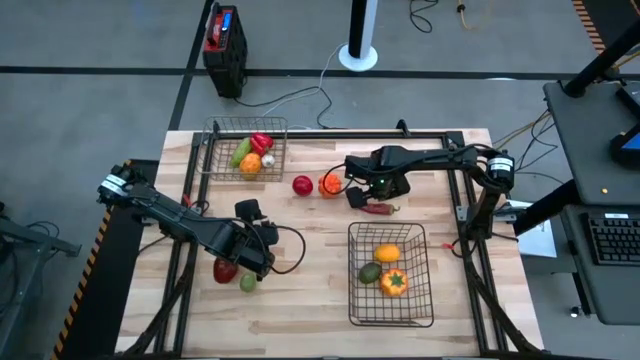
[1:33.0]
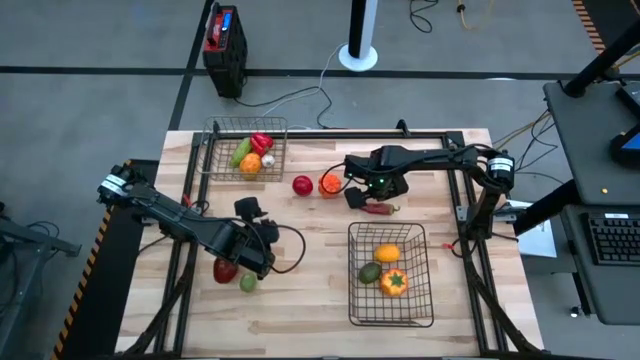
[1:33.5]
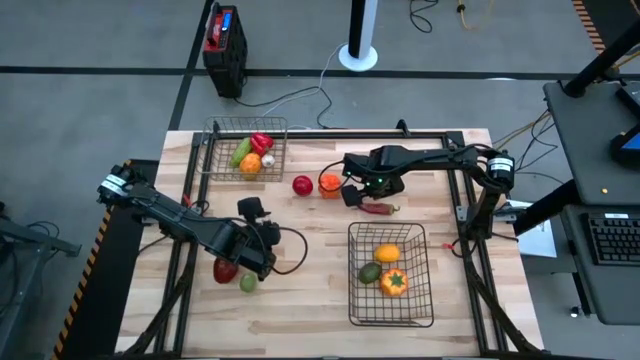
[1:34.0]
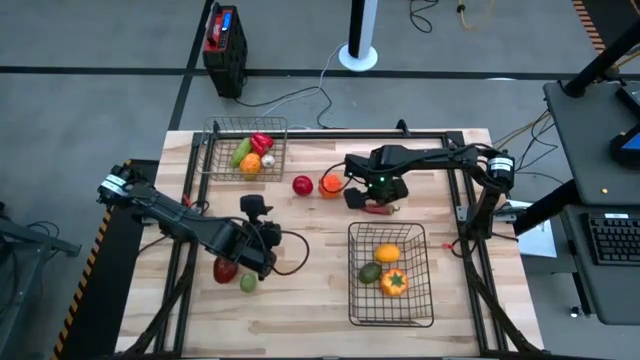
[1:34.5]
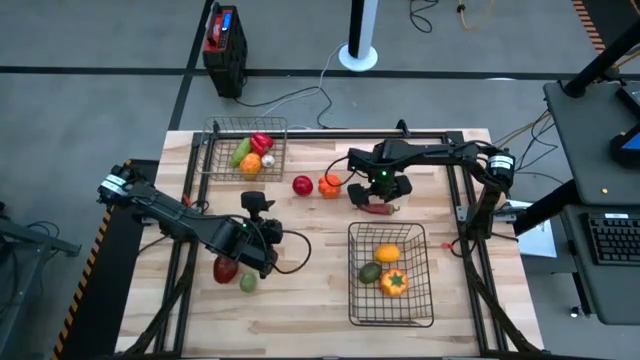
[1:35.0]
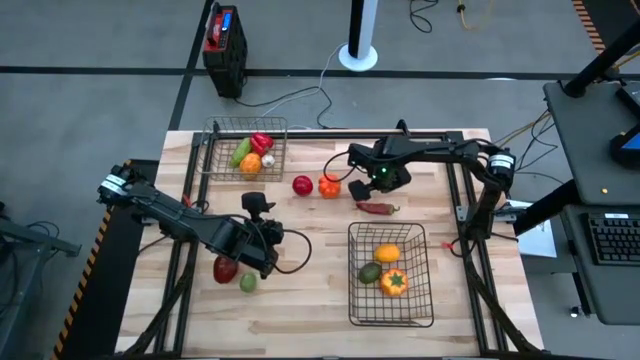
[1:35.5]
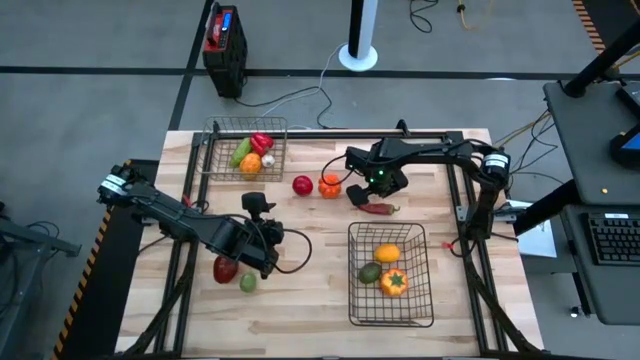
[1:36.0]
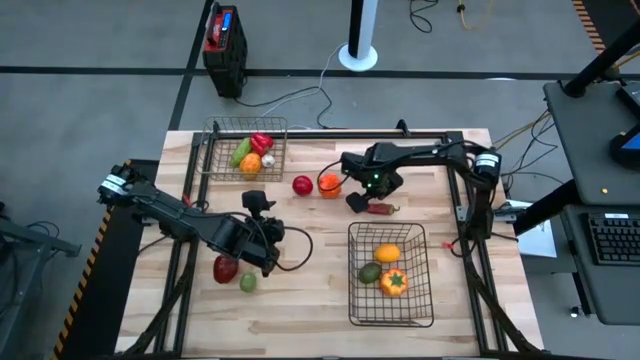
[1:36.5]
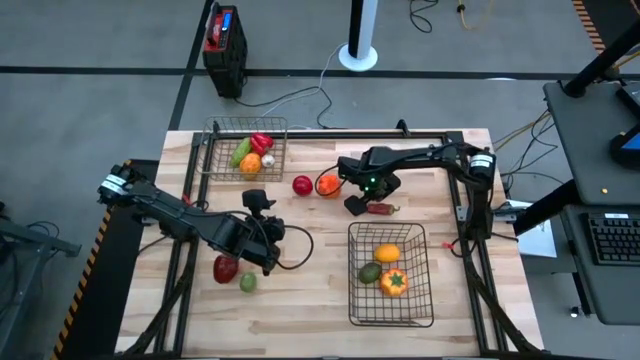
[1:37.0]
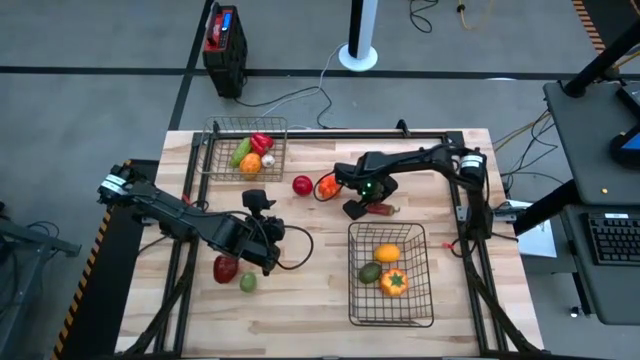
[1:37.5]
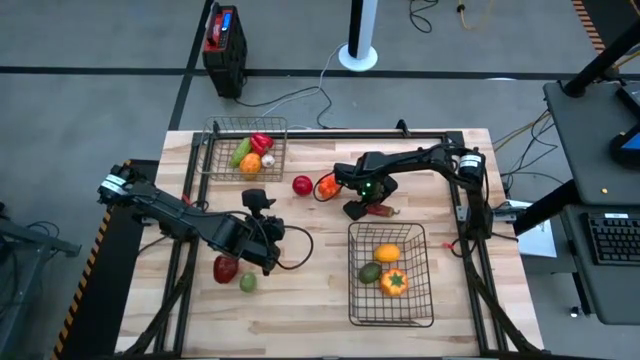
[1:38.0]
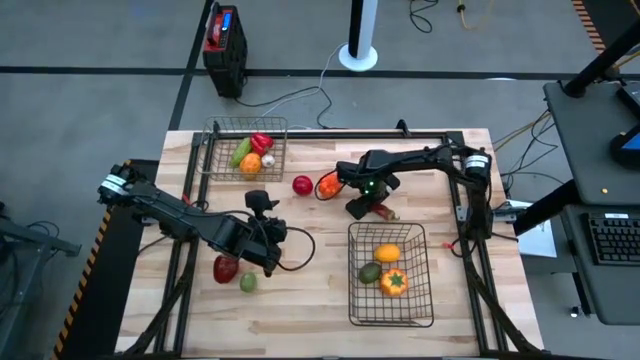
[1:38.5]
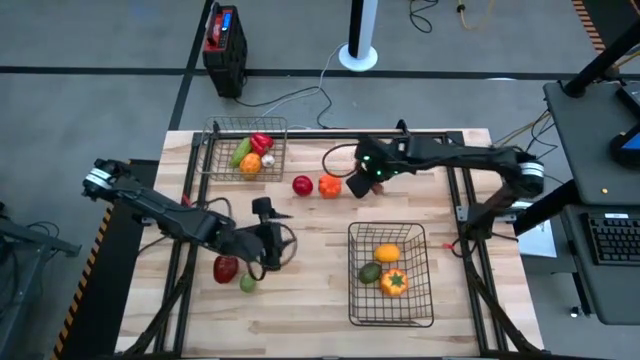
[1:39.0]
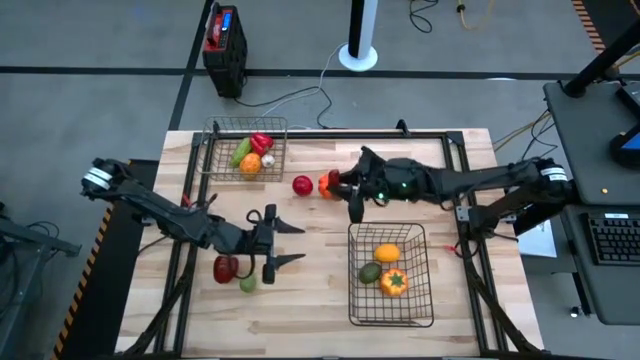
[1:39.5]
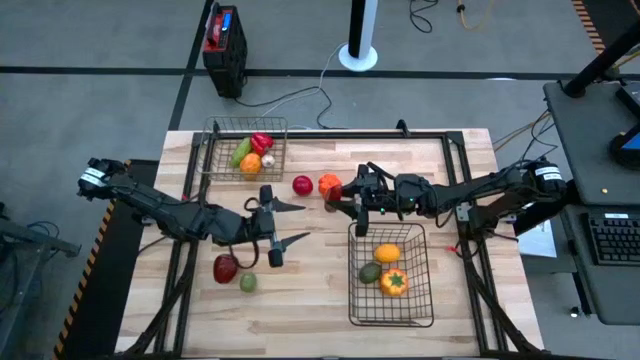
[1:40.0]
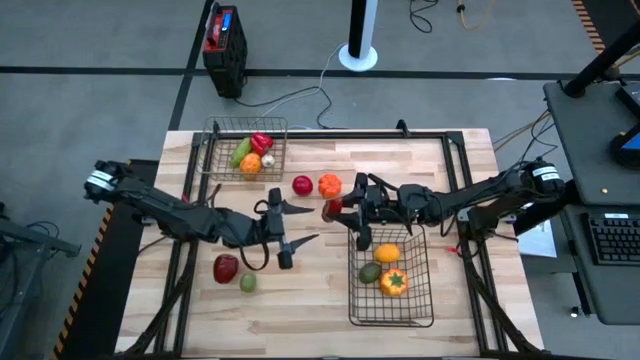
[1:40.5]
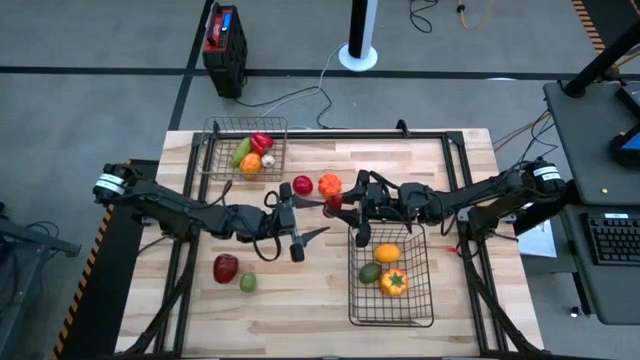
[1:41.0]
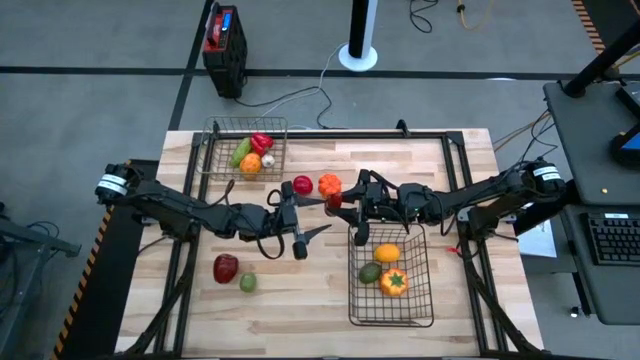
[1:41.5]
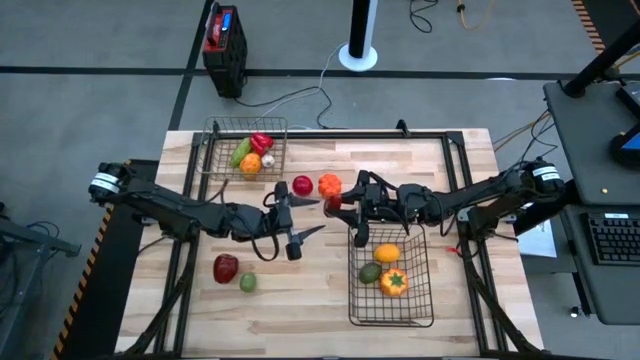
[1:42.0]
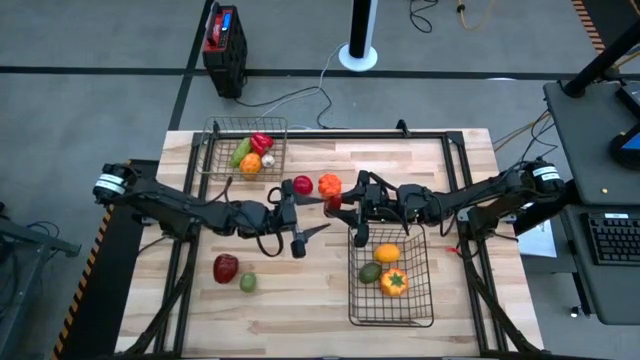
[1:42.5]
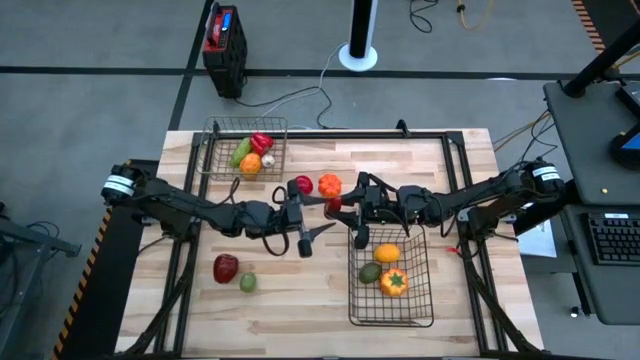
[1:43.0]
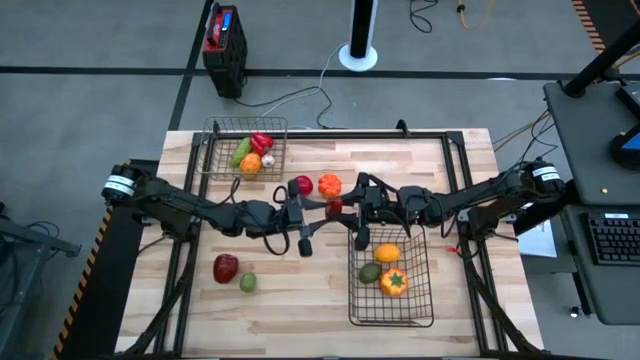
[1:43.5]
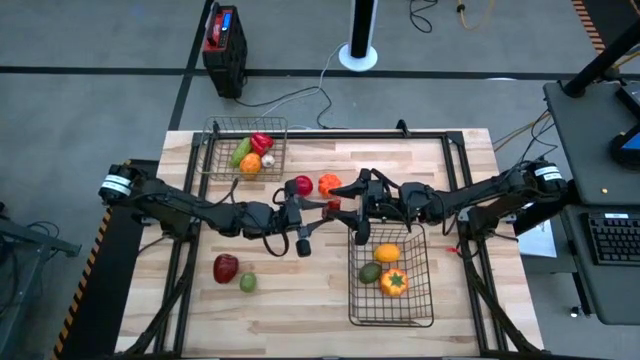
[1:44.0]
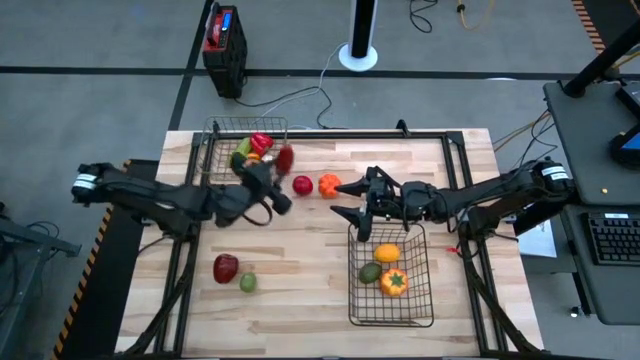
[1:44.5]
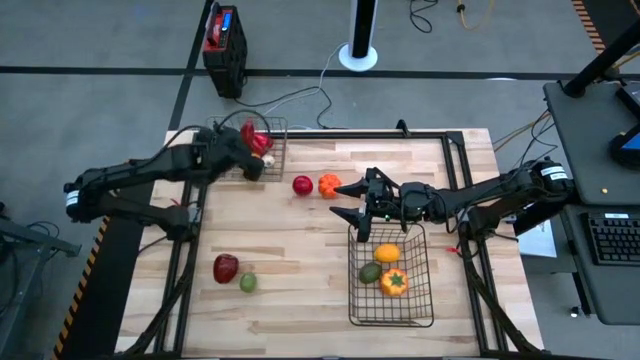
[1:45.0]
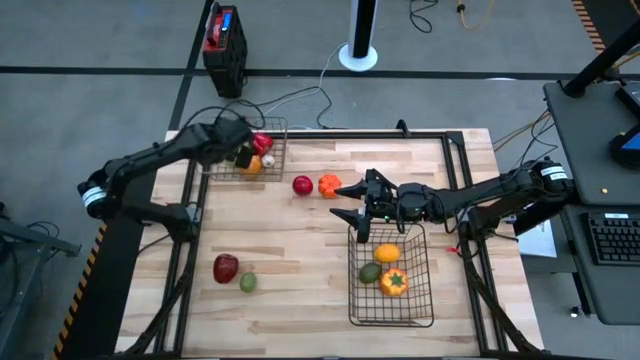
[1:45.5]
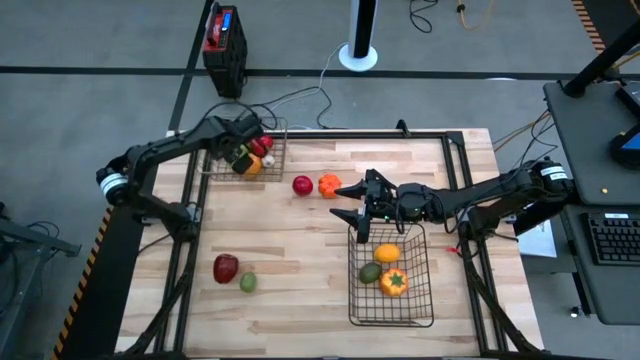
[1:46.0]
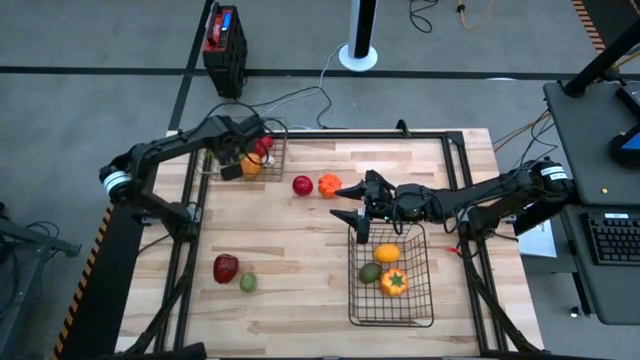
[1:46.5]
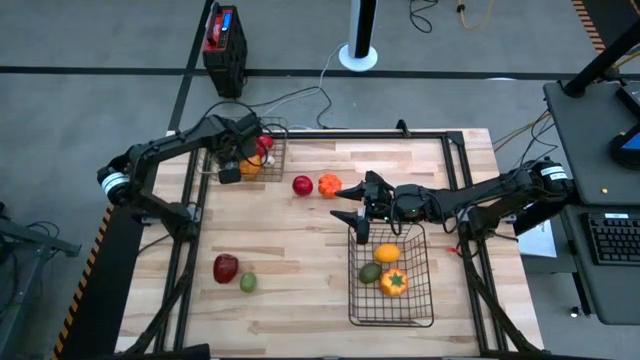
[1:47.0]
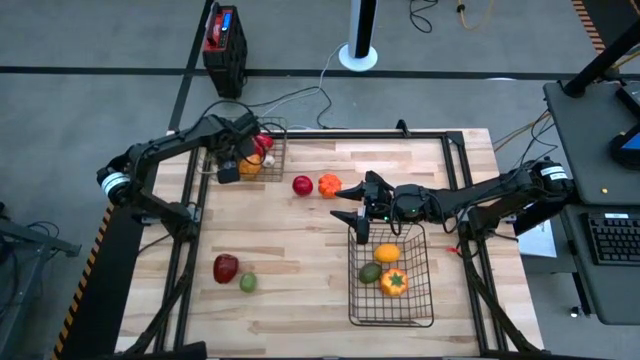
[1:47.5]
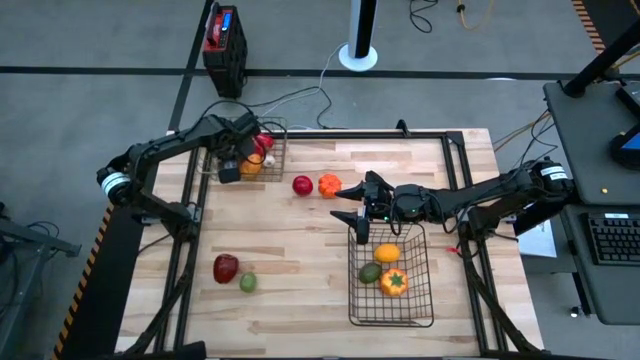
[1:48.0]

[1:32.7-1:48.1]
Task: Sort produce into baskets
Put the red chili pepper into the gold wire basket

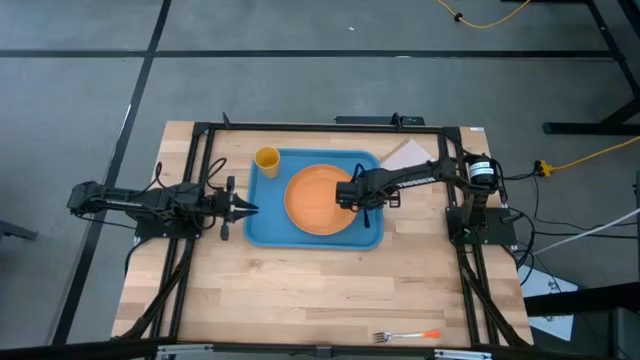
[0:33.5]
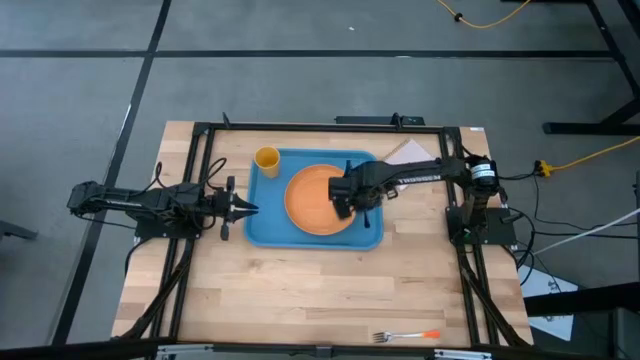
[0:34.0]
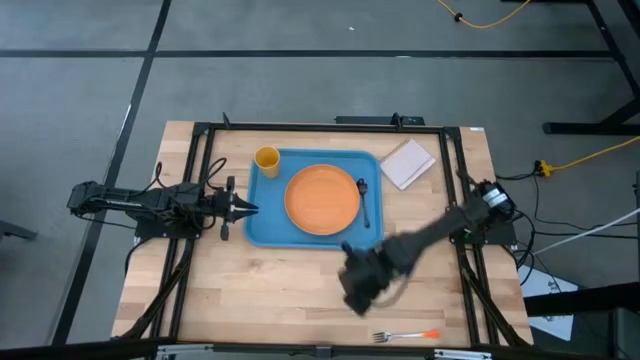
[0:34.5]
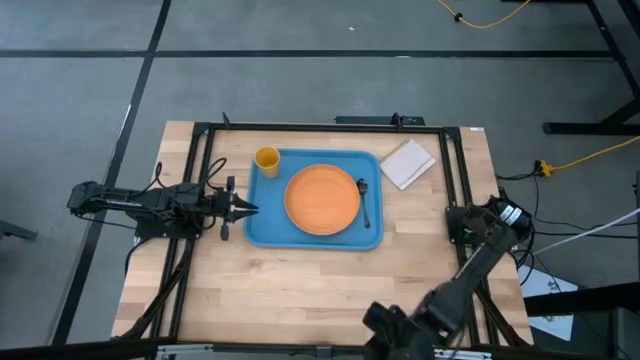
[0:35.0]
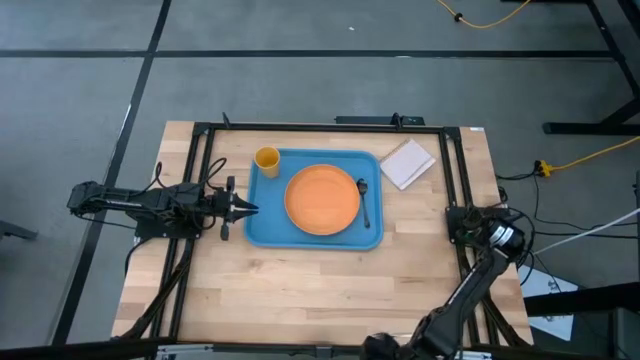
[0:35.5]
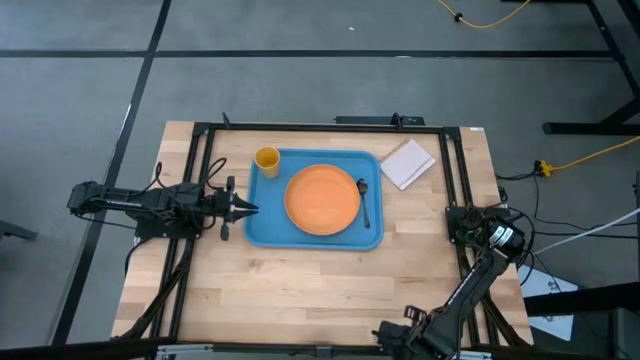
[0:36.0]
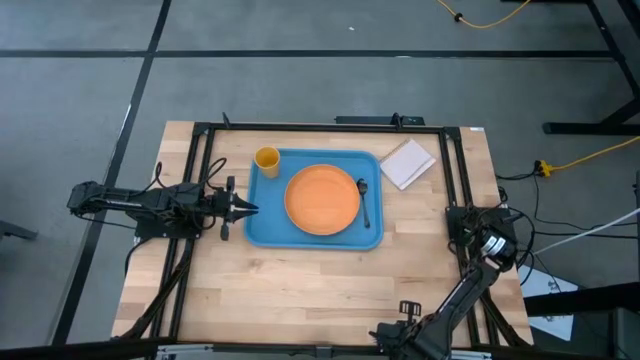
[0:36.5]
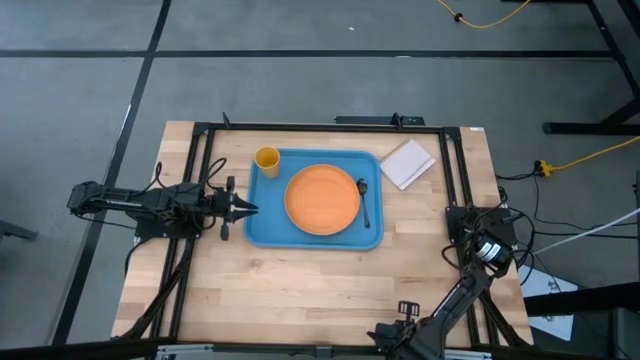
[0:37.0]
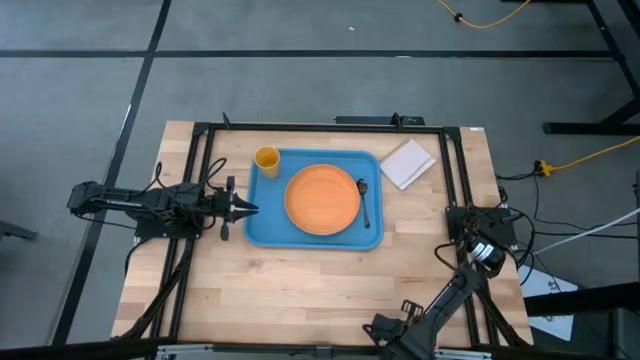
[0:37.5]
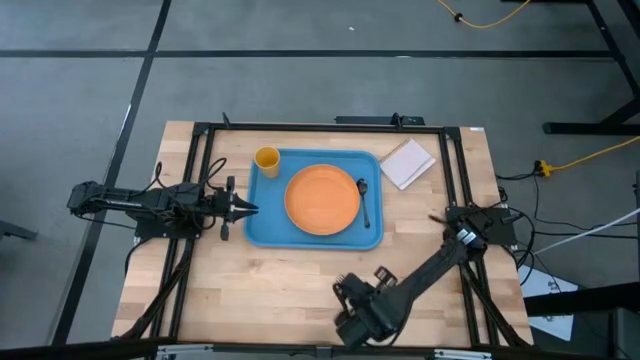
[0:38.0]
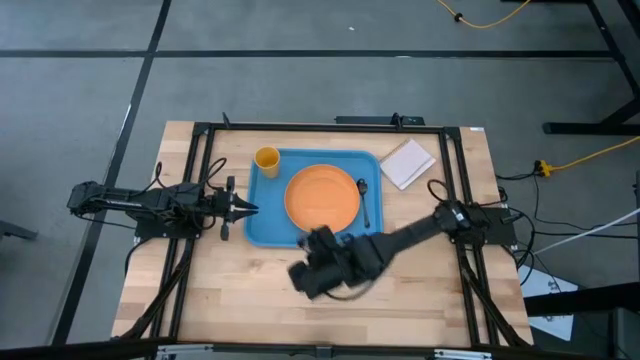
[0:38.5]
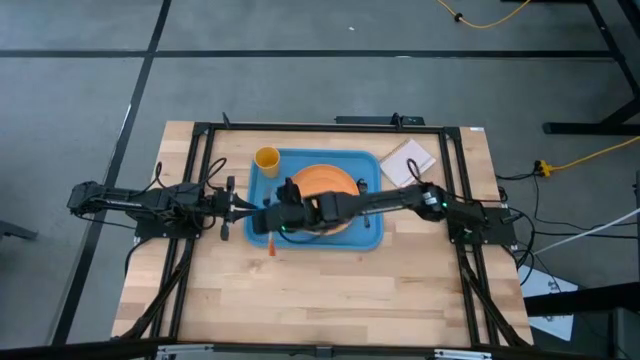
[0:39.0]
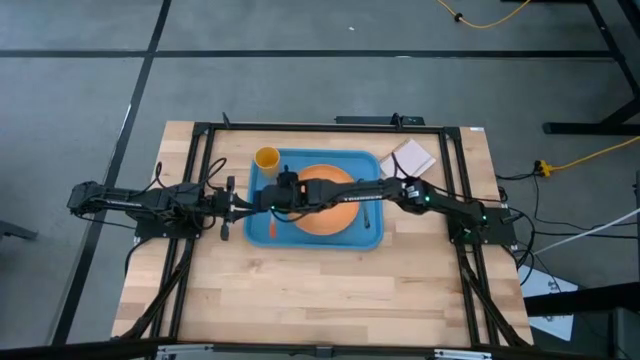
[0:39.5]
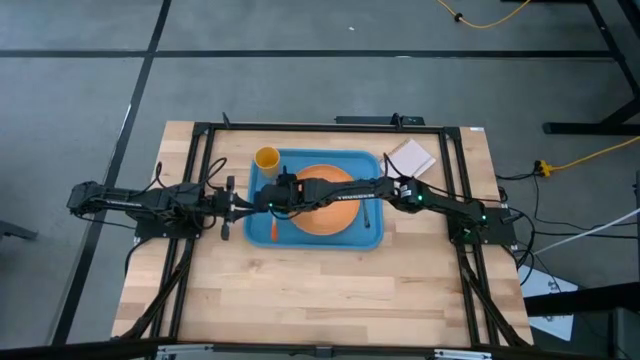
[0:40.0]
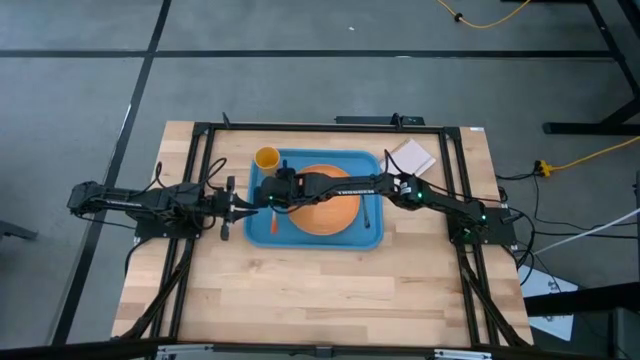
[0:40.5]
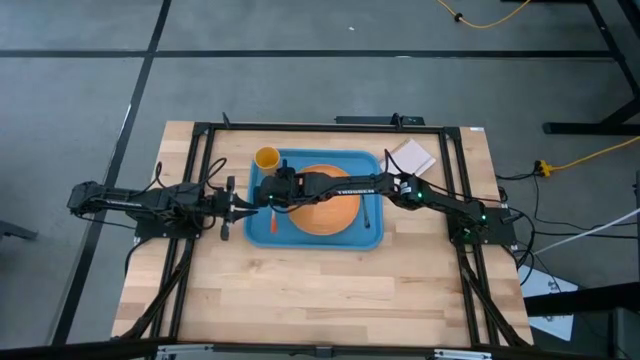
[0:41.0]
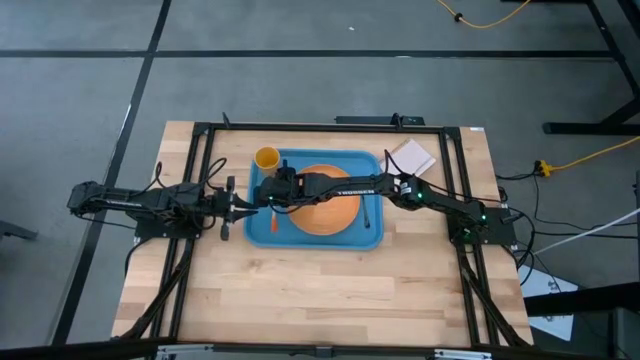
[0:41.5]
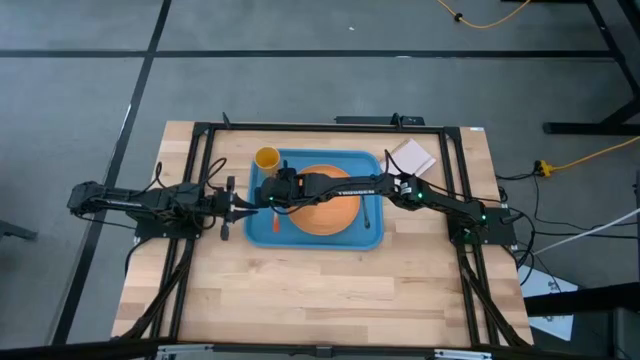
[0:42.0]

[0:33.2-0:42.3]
Task: Pick and place plate/cup/fork/spoon on tray
Put the orange fork to the left of the orange plate on the blue tray
